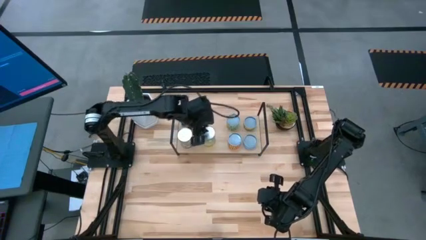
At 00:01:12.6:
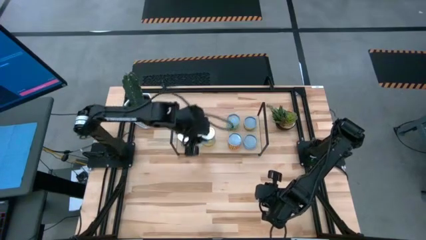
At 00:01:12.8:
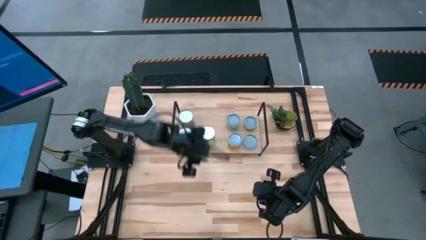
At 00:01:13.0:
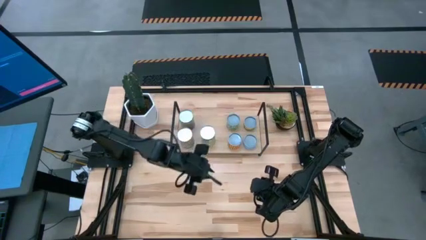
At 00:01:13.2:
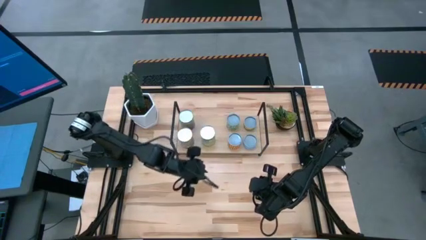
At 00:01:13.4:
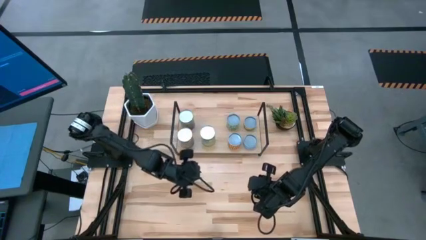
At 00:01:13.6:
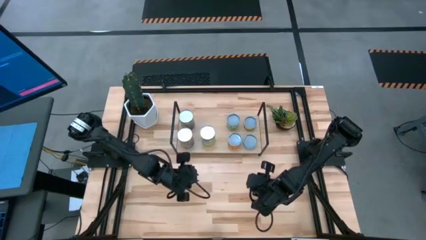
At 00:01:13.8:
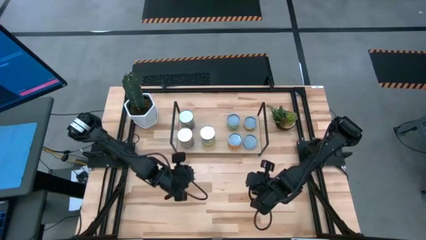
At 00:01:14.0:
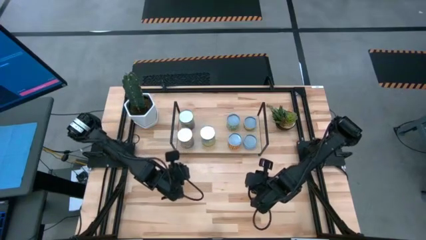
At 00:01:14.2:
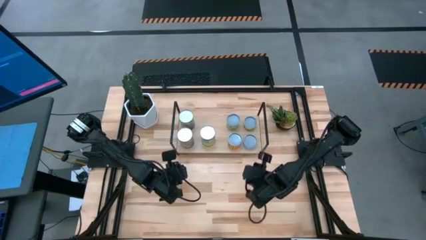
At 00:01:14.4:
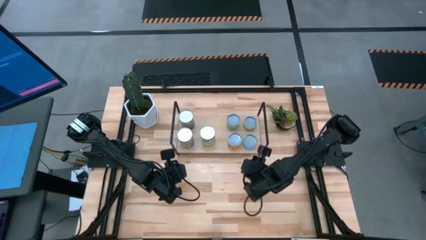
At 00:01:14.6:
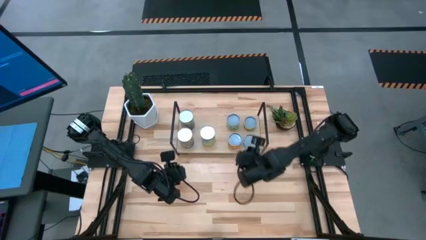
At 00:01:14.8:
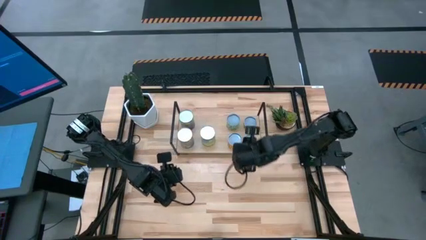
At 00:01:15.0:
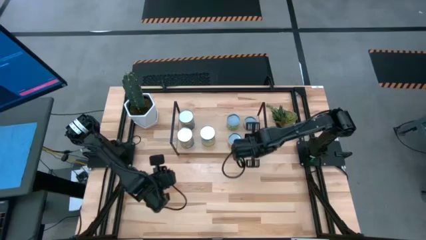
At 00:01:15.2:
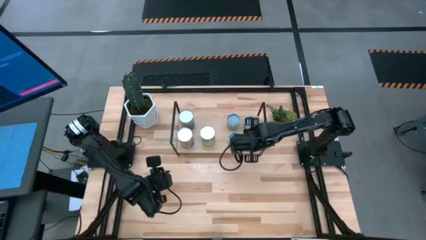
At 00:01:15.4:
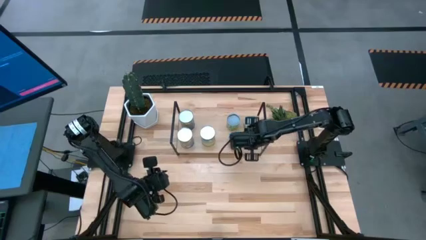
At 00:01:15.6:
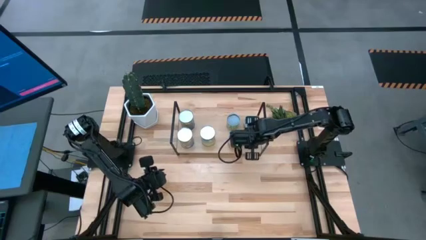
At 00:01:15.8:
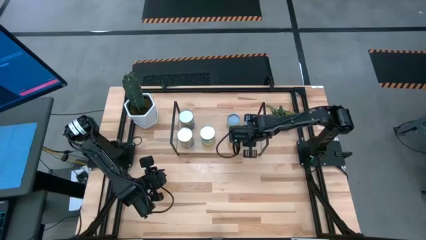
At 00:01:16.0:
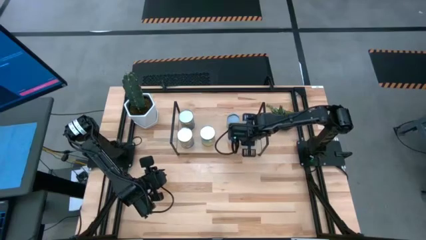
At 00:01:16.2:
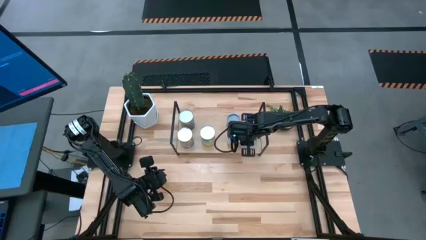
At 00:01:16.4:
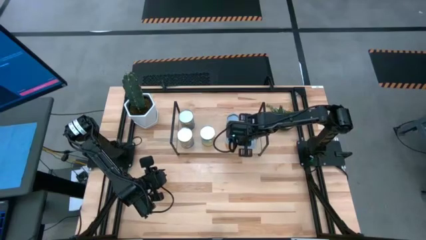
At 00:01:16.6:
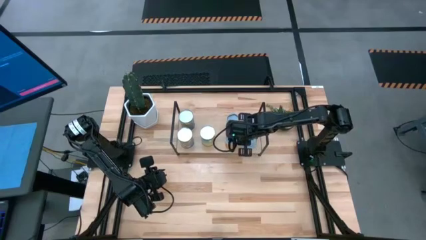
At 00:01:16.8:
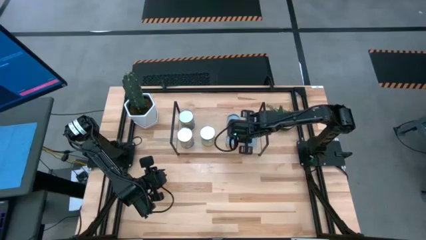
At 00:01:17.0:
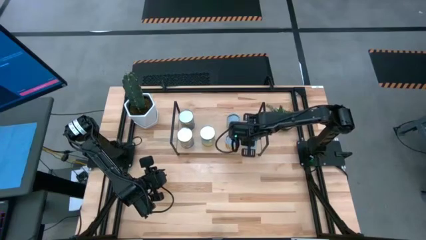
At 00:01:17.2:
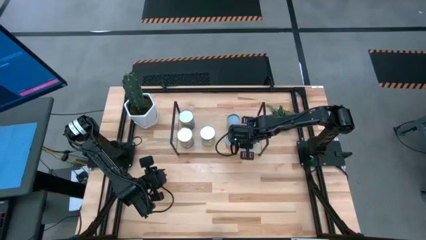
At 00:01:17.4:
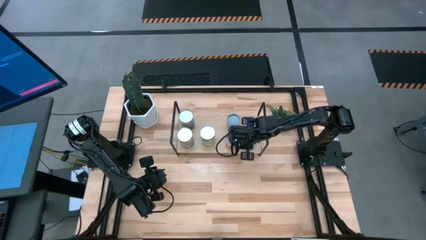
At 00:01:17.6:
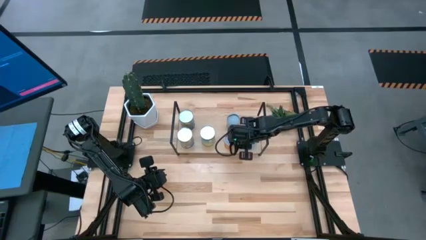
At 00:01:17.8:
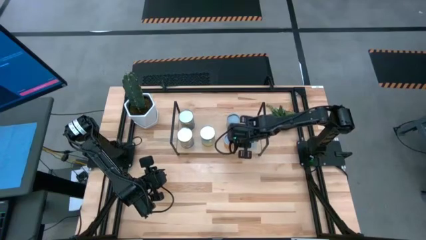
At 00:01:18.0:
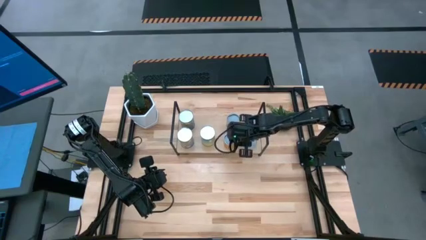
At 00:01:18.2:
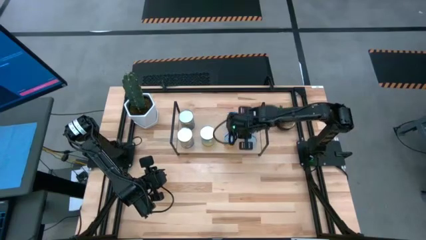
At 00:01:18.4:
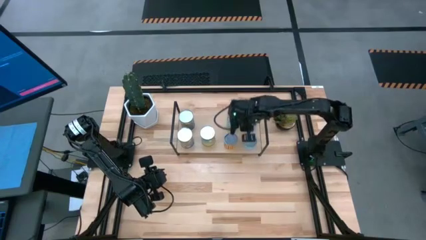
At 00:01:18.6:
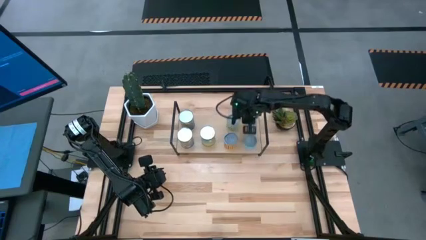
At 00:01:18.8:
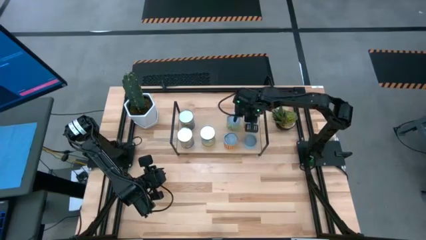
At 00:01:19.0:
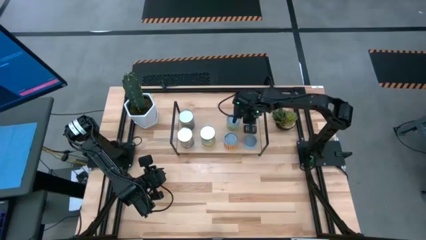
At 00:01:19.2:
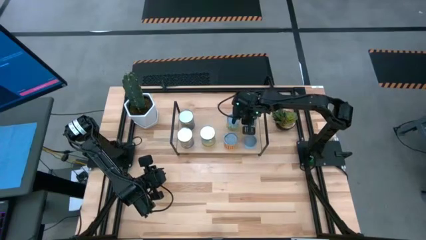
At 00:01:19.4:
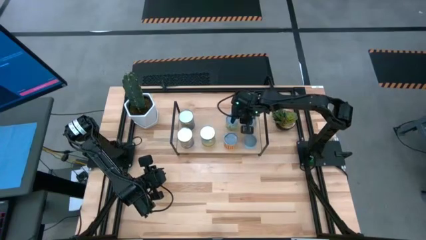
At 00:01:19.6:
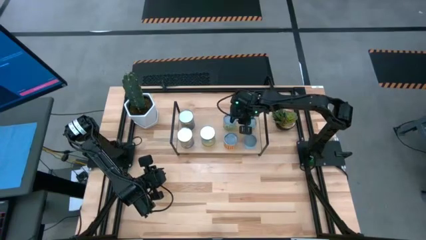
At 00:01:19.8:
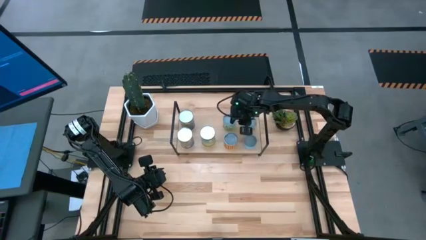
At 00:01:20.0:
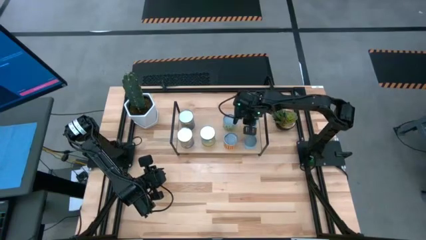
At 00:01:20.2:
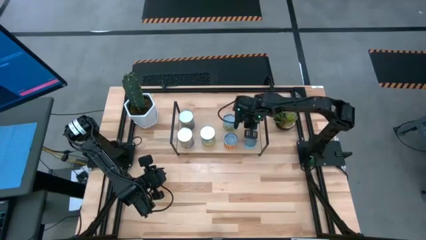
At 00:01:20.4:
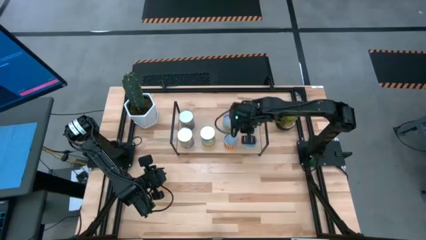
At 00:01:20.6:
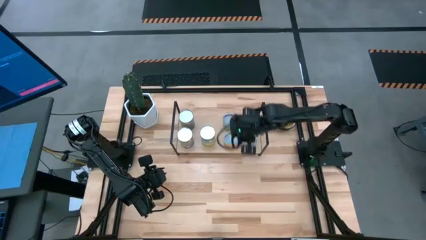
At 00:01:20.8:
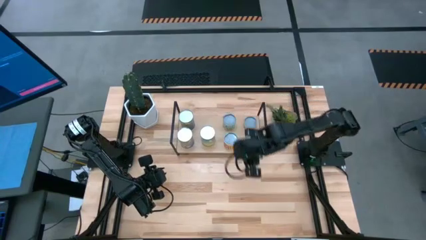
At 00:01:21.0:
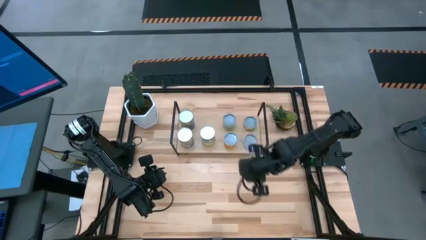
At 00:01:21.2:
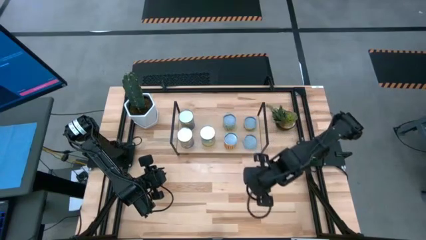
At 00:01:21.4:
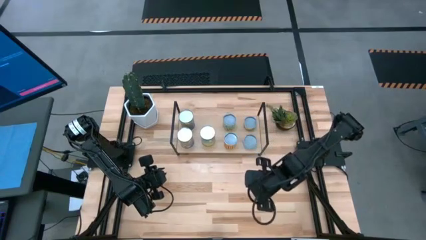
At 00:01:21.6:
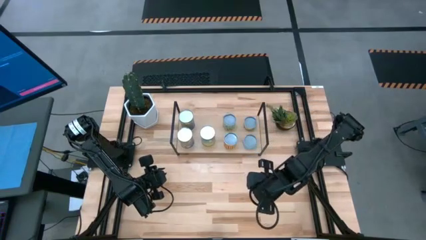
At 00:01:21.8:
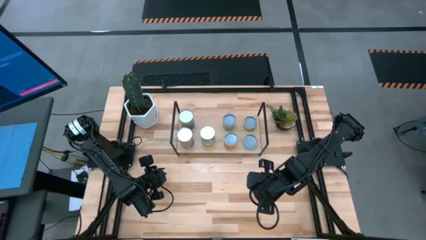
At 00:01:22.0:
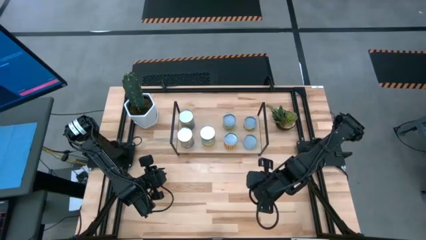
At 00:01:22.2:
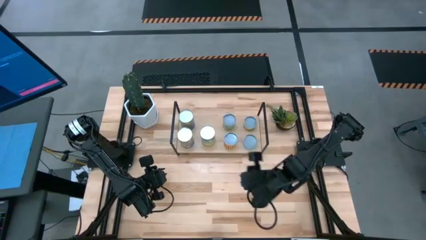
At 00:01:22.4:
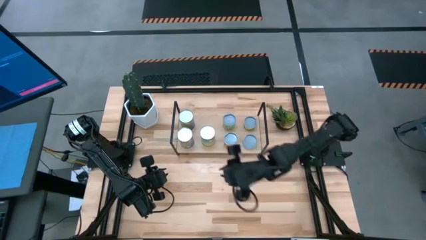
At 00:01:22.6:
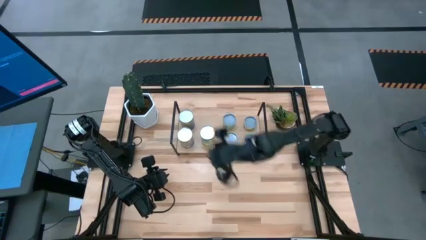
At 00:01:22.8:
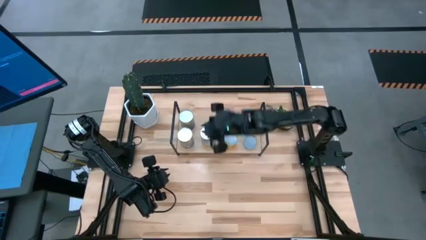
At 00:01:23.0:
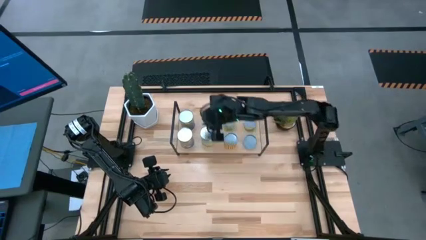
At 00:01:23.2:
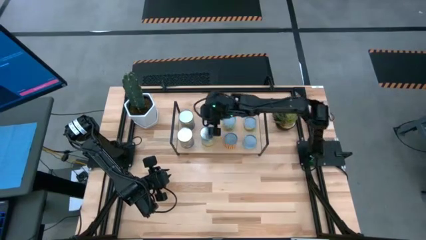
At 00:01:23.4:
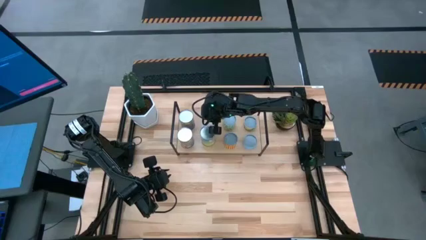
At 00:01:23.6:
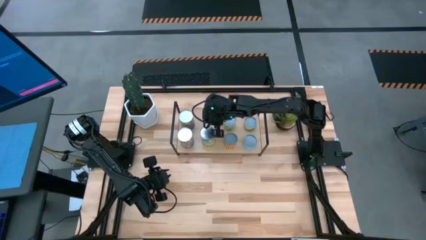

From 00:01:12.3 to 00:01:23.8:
Task: Pick and place cans onto a shelf
Adjust the canned goods on the shelf

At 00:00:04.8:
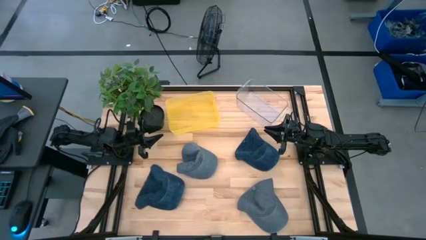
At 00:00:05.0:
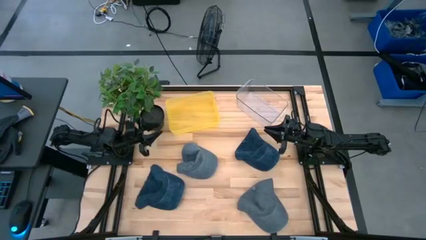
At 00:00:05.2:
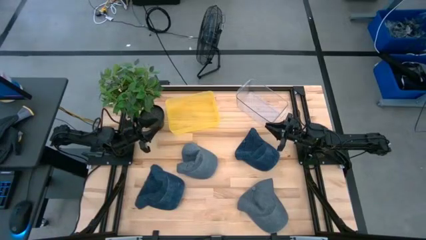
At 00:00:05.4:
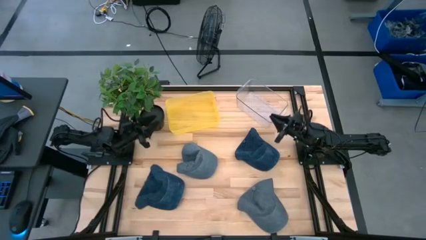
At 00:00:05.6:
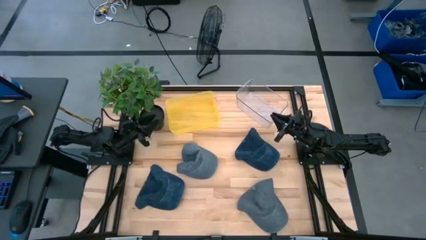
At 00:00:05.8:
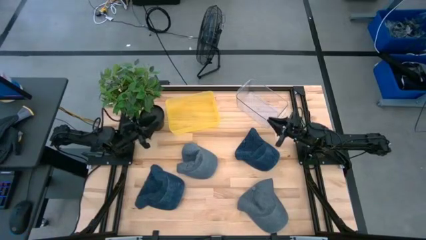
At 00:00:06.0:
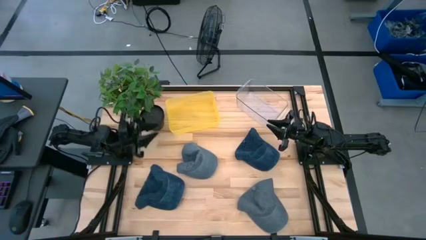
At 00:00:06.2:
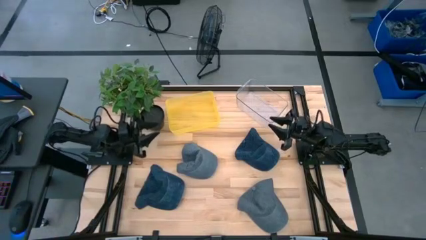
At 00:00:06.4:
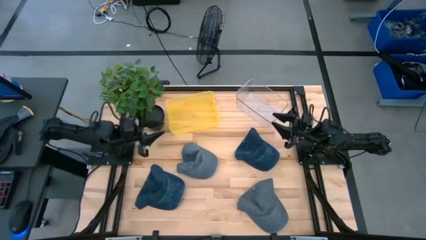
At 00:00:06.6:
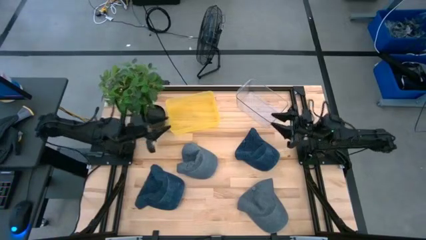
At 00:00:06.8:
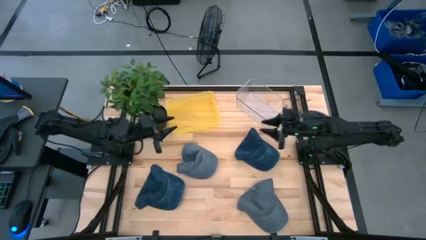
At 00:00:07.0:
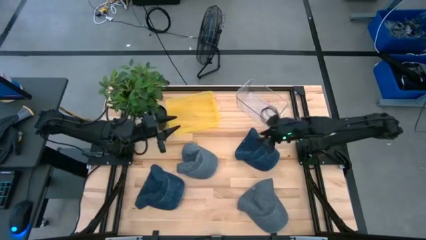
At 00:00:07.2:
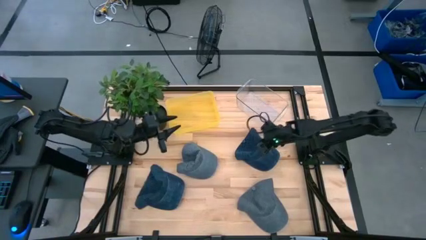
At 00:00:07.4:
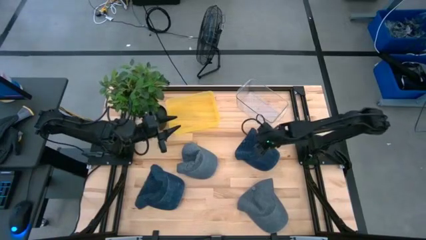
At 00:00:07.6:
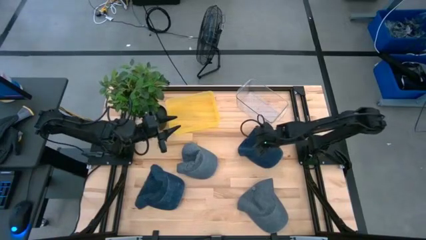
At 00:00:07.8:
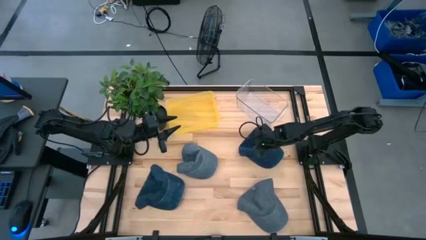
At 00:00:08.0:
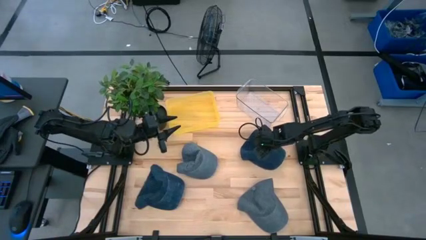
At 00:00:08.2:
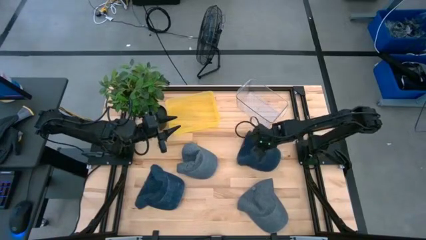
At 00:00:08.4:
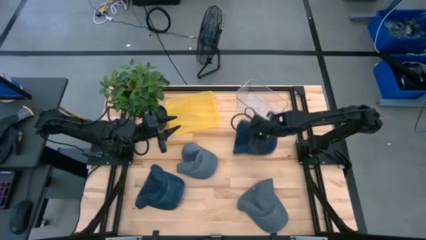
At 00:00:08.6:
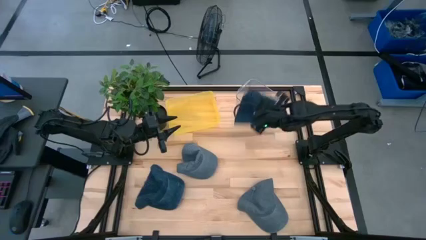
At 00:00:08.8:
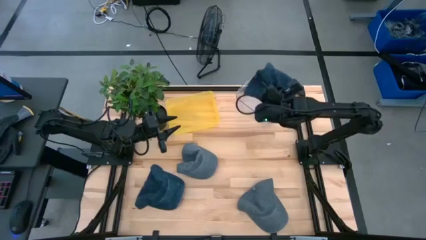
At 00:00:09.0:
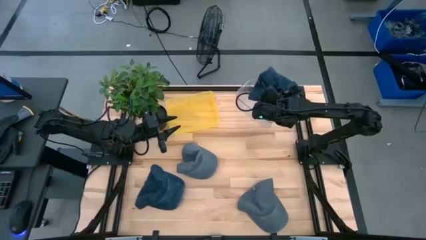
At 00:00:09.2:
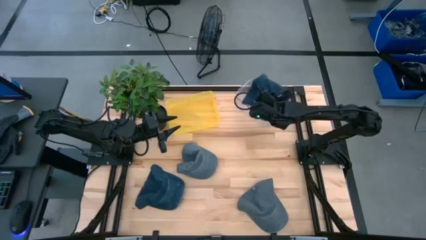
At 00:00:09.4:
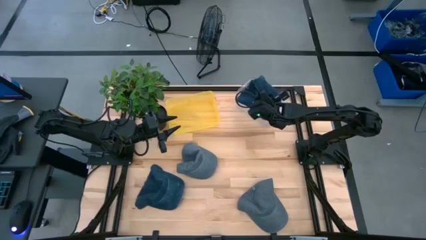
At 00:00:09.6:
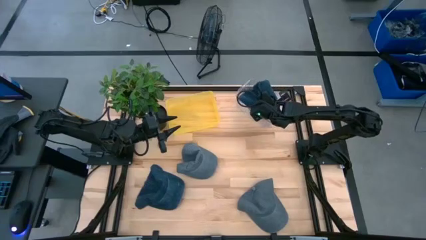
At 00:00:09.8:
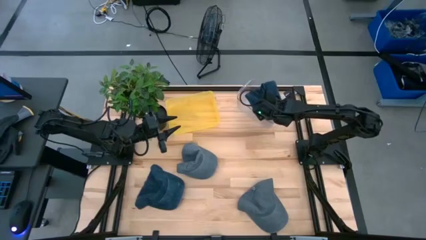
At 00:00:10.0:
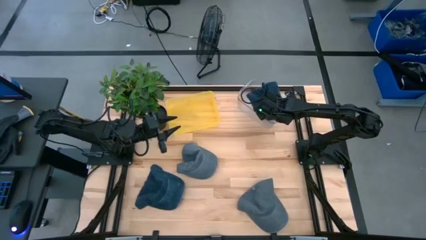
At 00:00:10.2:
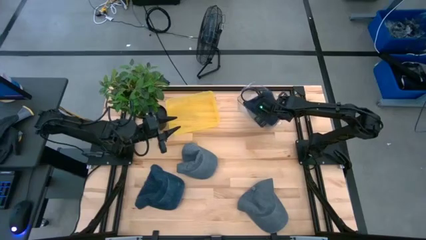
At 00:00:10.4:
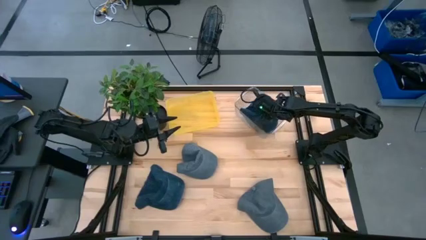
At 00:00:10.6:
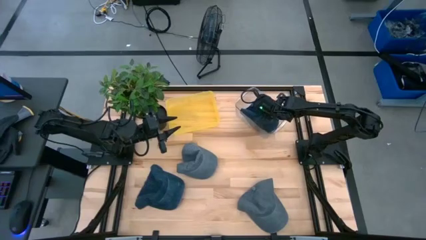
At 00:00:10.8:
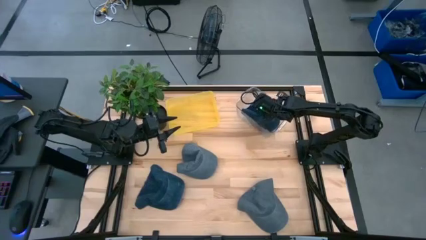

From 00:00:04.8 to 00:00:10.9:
Task: Pick & Place hat
Put the top blue cap into the transparent bin
